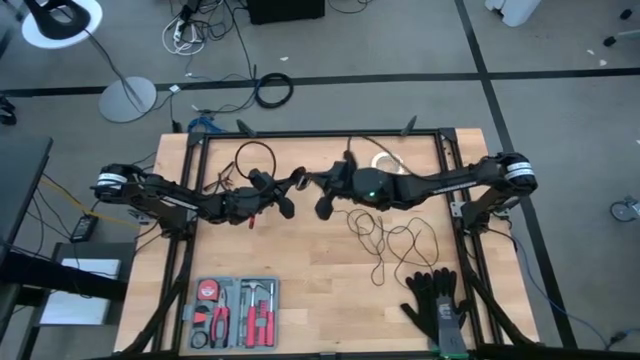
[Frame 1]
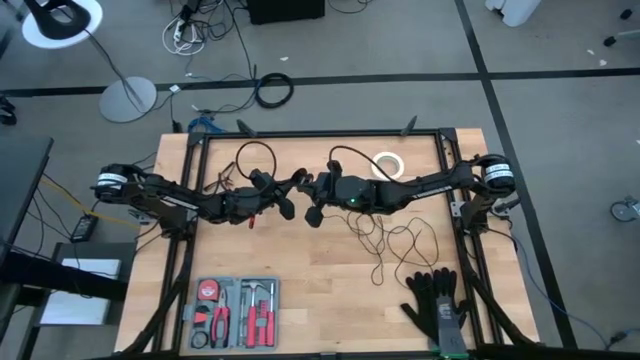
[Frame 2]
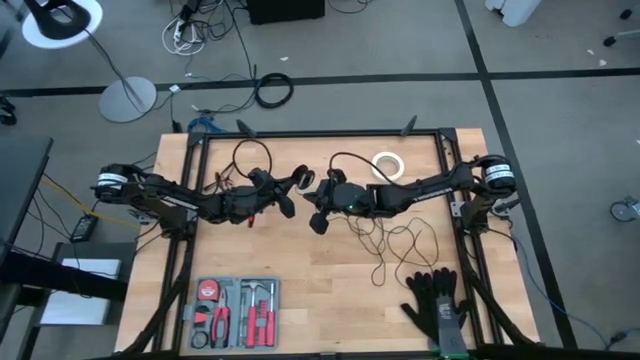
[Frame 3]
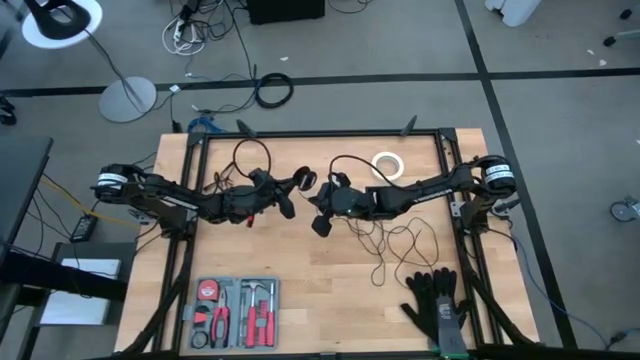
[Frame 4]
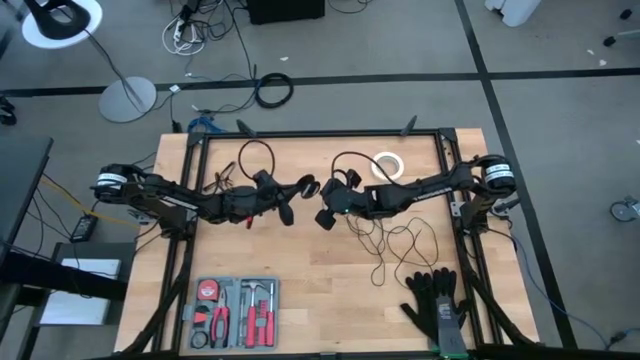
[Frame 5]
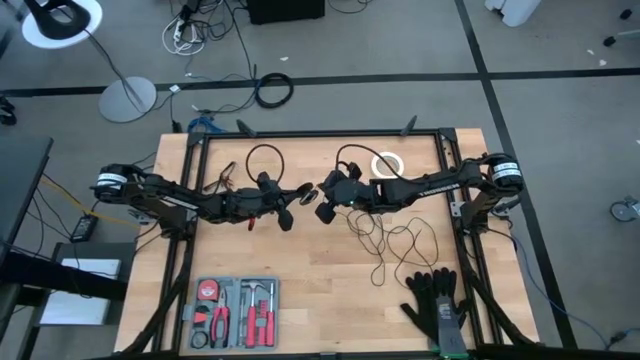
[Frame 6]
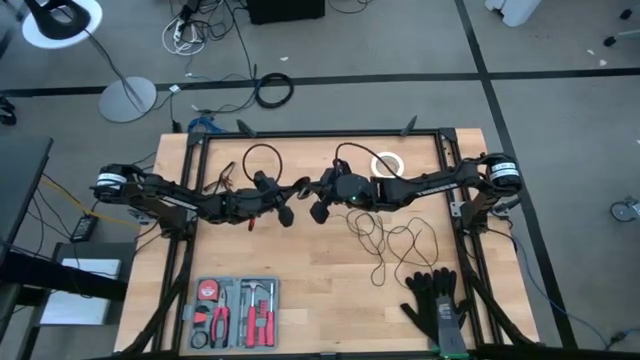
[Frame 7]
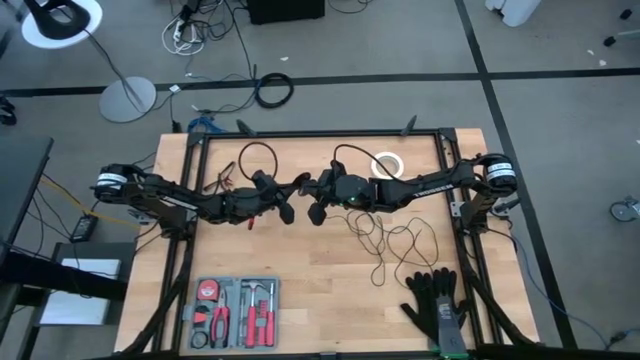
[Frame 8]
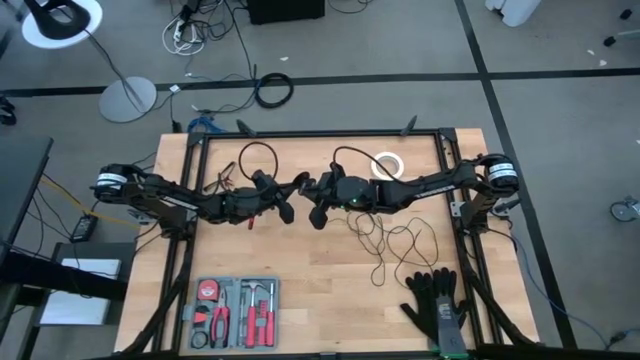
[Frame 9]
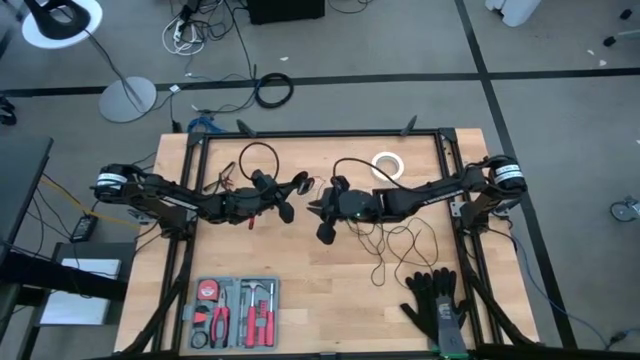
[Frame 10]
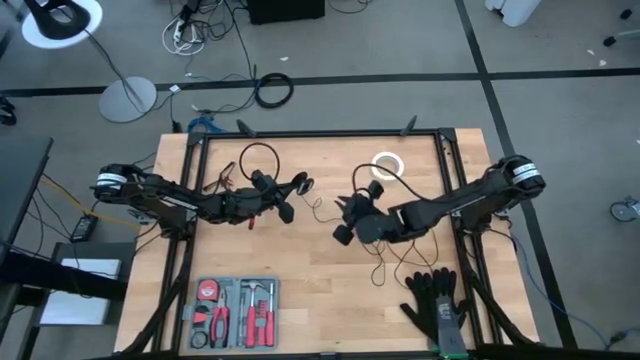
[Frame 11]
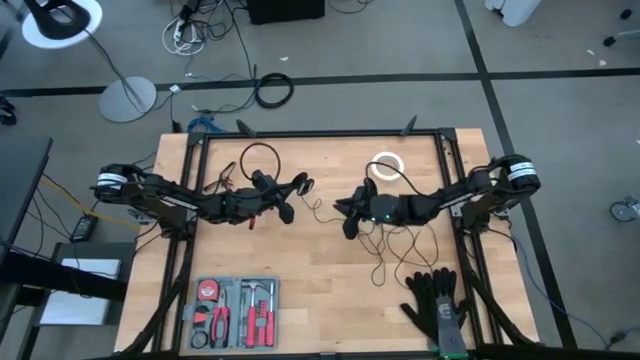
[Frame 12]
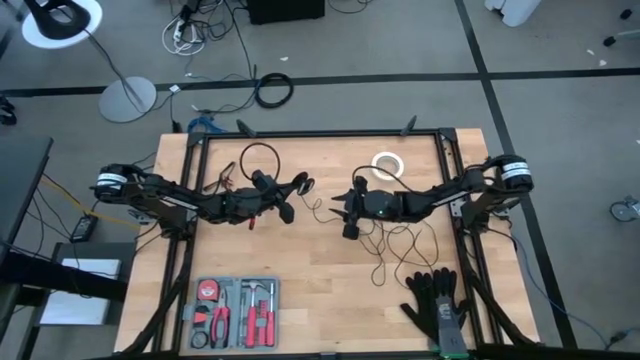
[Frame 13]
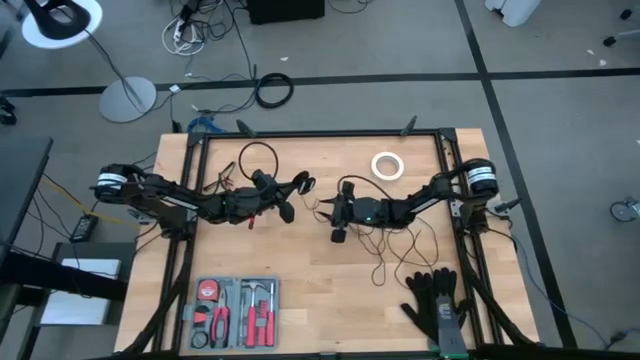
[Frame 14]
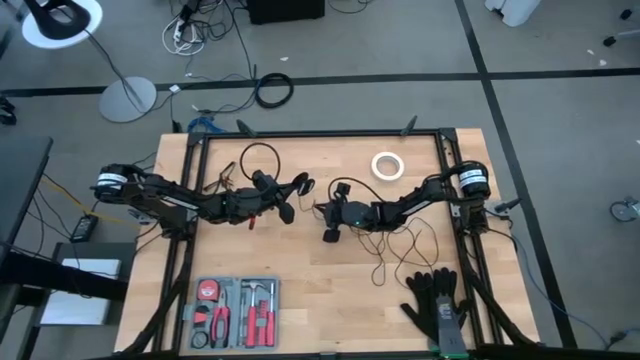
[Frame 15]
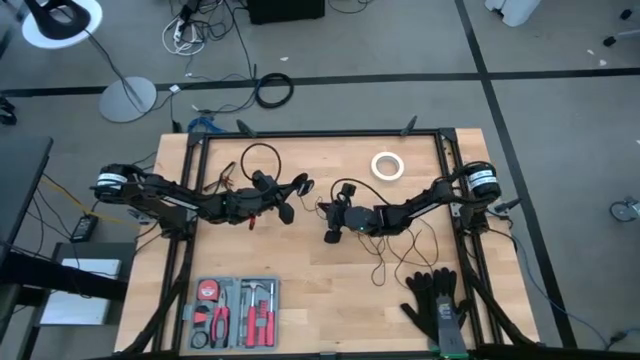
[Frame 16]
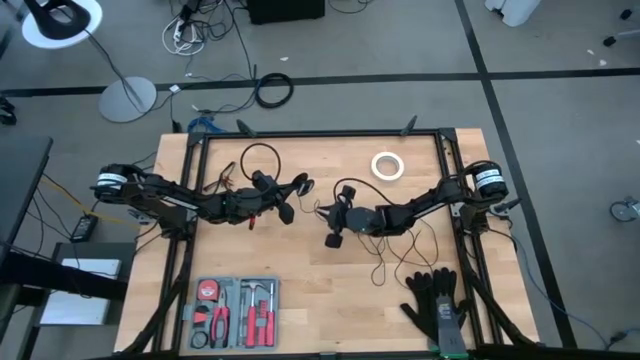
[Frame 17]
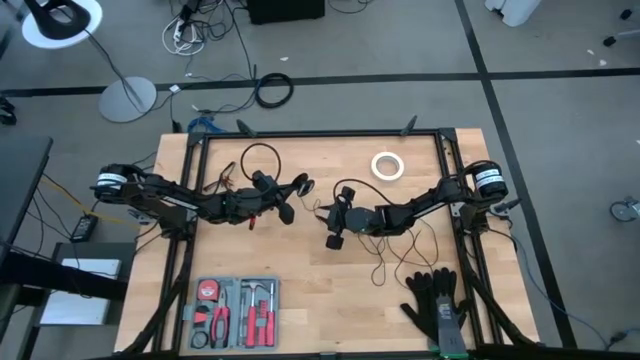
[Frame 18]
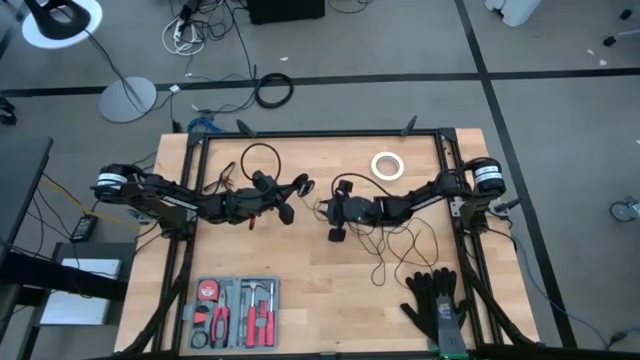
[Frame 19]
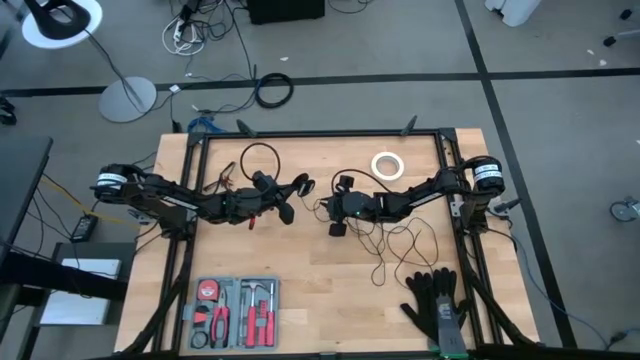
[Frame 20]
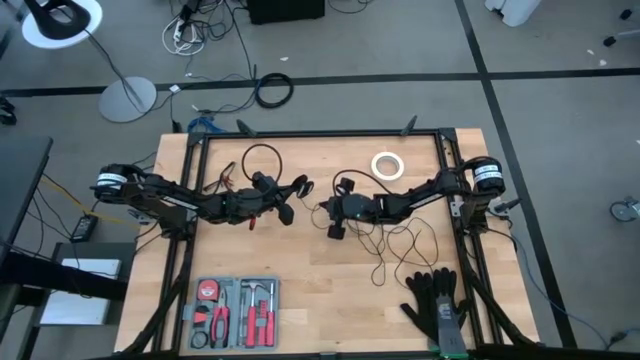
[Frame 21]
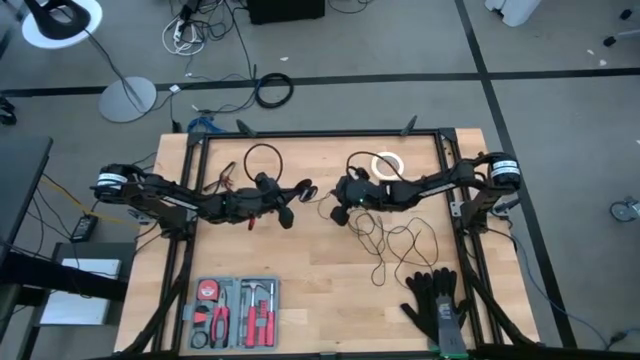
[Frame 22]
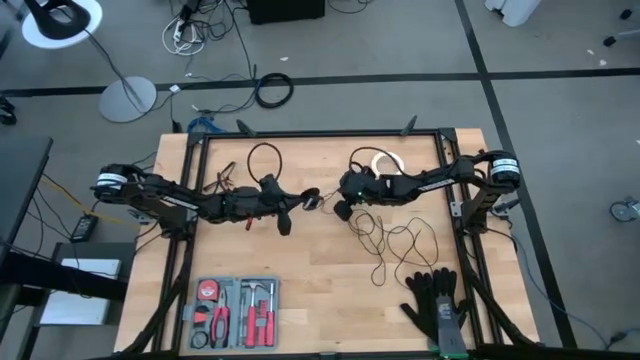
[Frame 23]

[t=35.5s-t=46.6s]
Task: Coil cords
Coil the black wire on the black spool

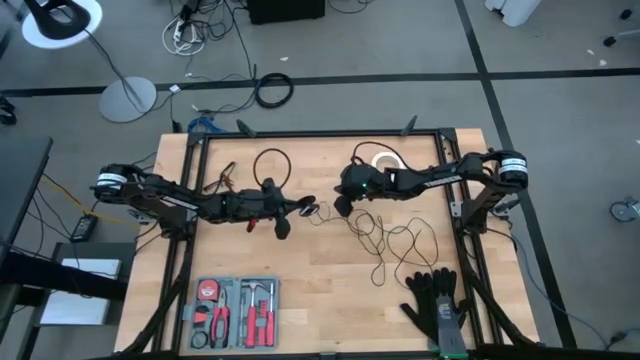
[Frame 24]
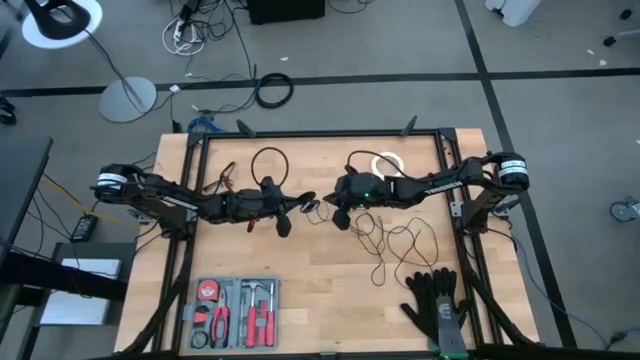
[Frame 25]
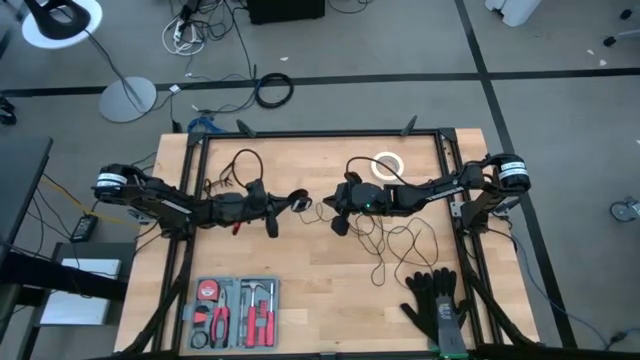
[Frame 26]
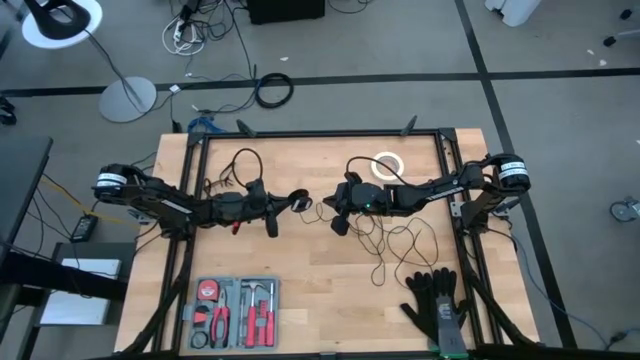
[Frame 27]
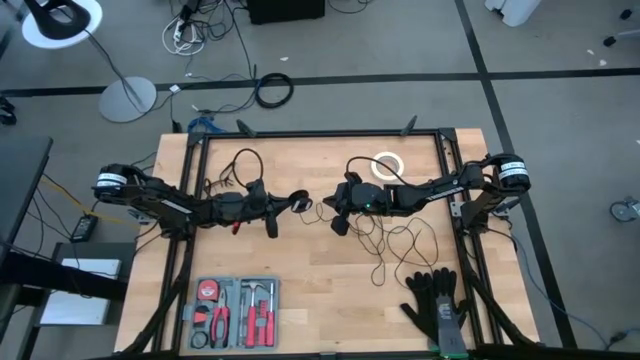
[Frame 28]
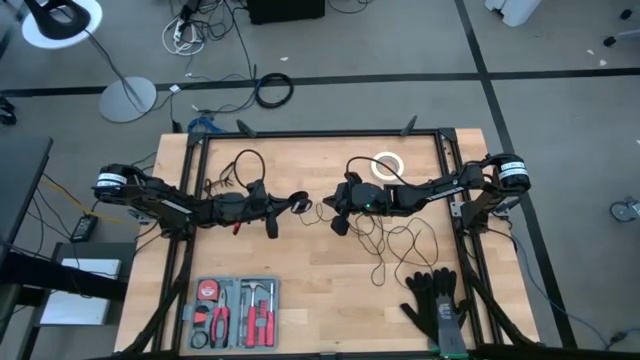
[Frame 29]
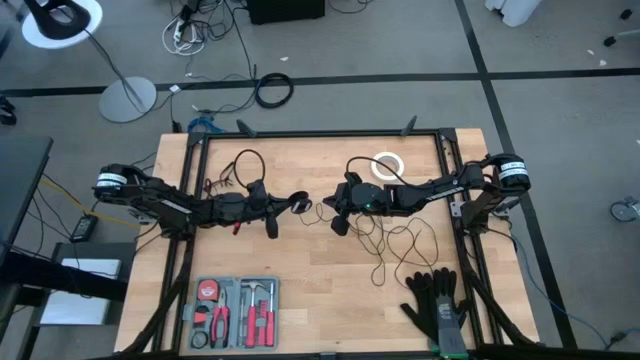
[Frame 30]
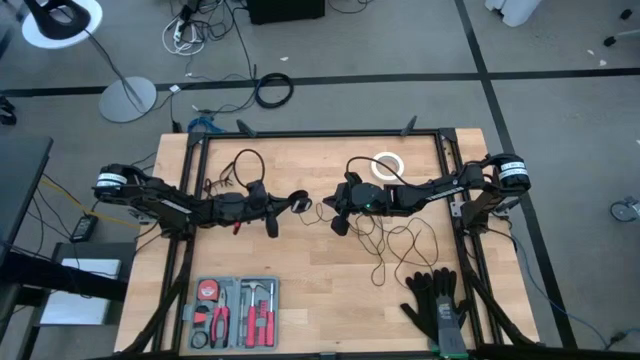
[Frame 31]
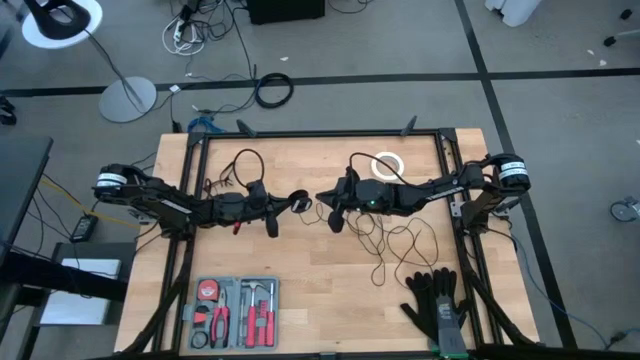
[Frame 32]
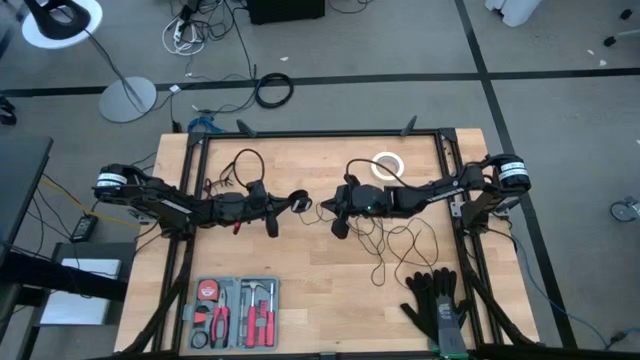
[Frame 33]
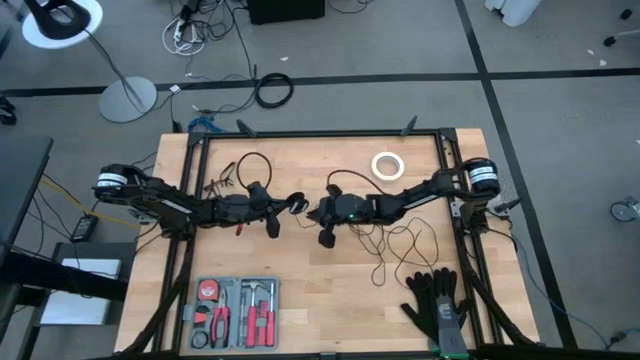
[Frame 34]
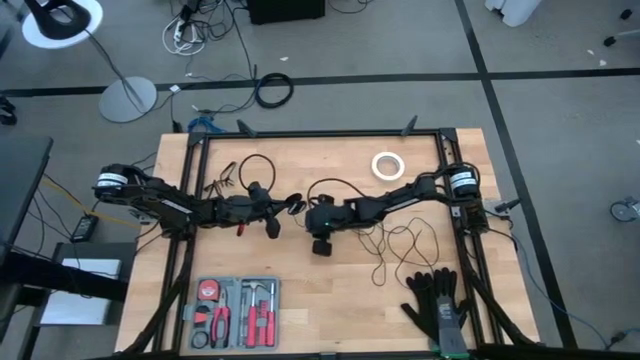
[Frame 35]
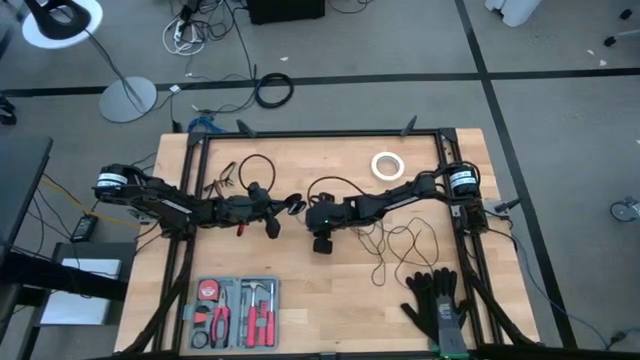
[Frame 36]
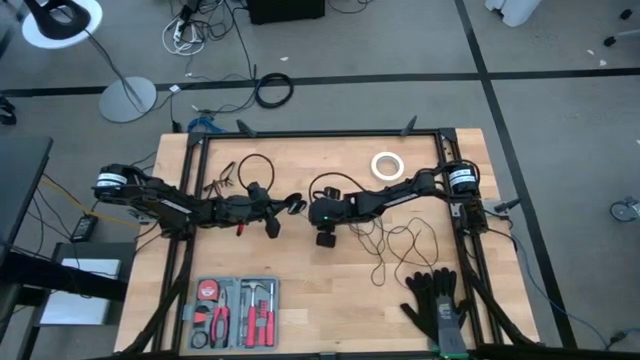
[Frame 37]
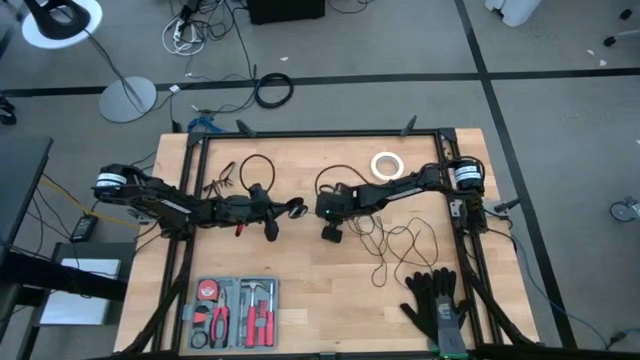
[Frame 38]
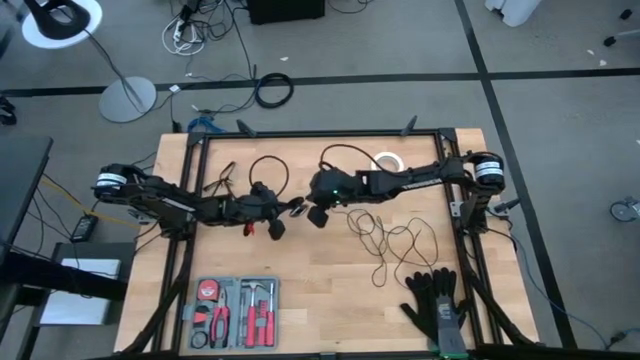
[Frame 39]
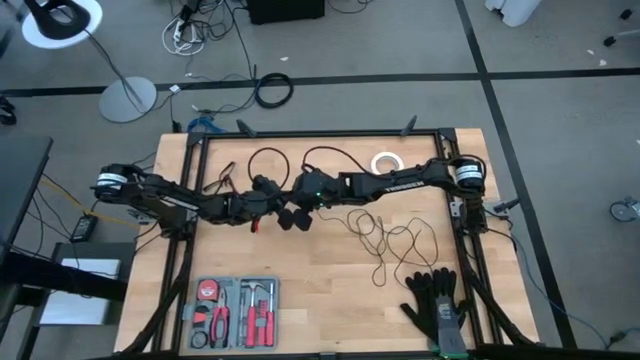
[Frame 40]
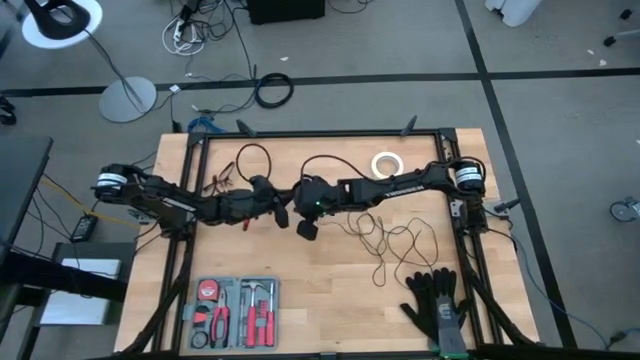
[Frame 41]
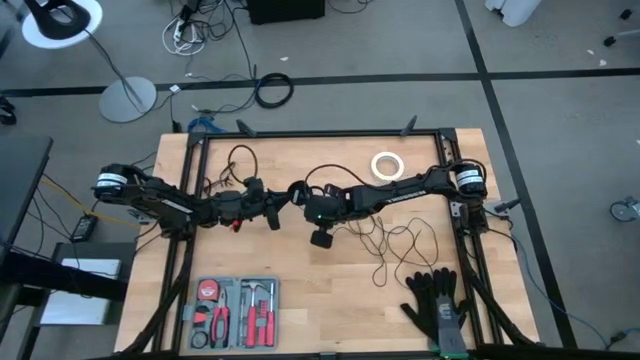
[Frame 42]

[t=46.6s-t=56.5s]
Coil the black wire on the black spool
